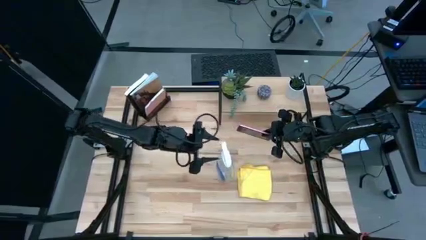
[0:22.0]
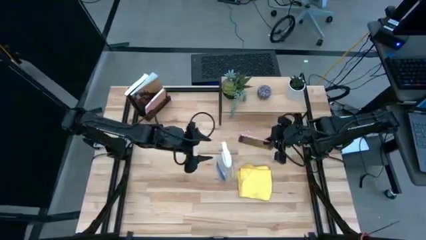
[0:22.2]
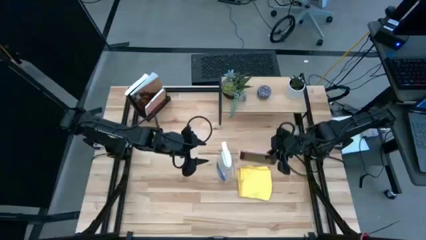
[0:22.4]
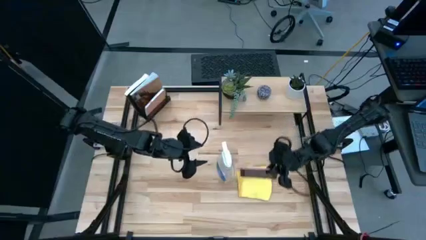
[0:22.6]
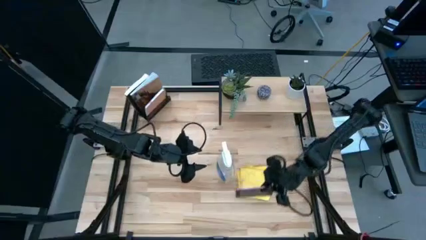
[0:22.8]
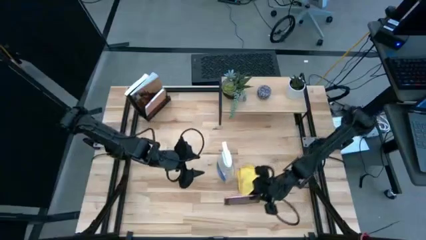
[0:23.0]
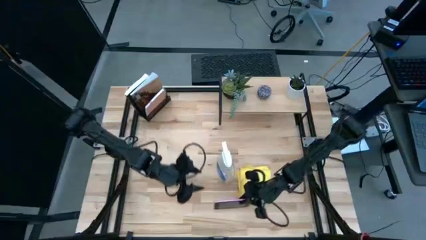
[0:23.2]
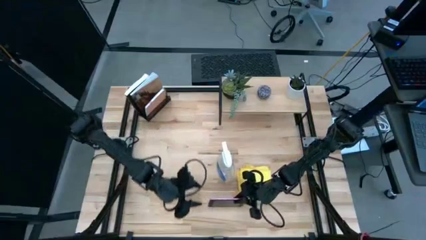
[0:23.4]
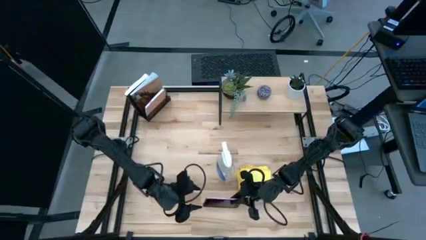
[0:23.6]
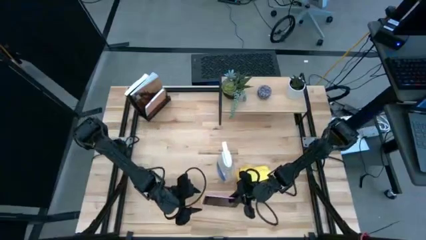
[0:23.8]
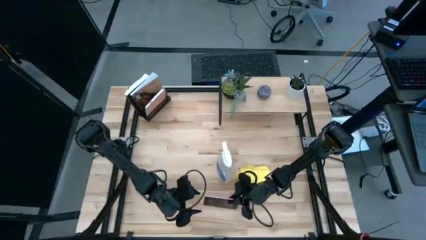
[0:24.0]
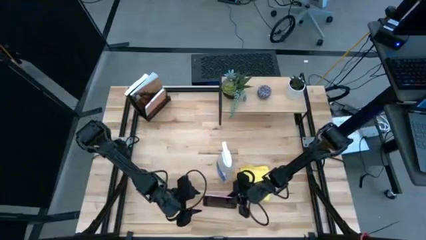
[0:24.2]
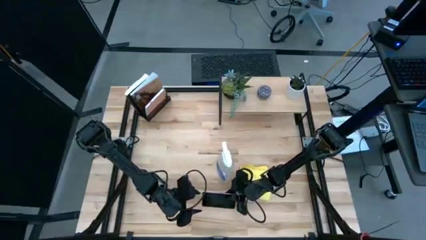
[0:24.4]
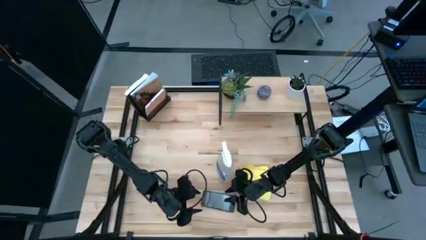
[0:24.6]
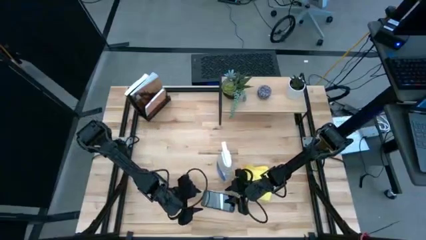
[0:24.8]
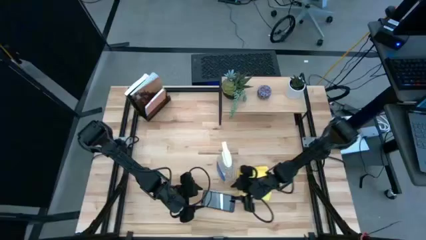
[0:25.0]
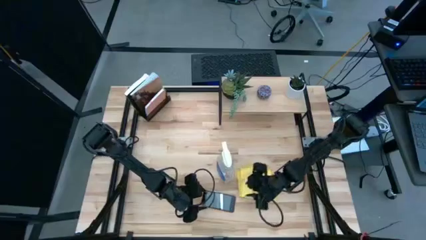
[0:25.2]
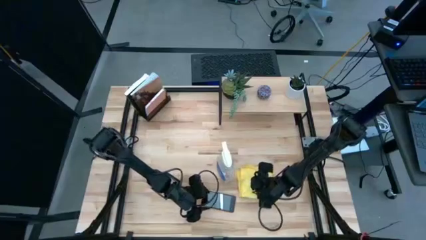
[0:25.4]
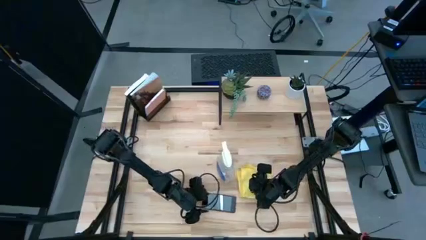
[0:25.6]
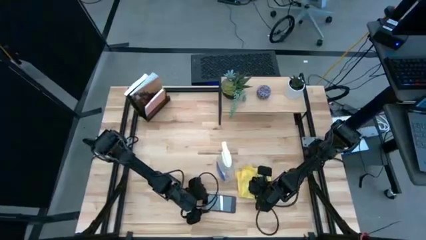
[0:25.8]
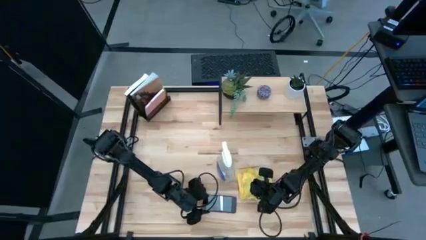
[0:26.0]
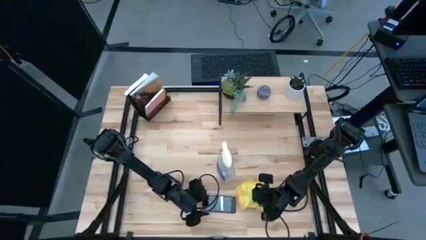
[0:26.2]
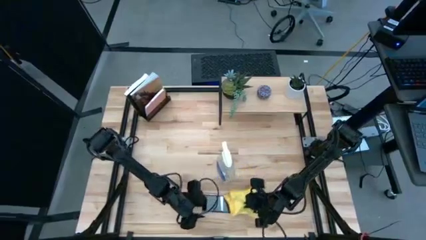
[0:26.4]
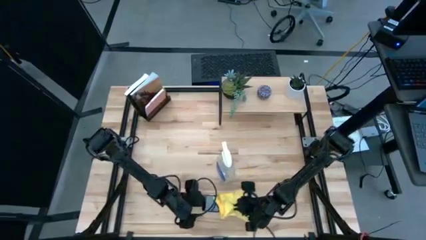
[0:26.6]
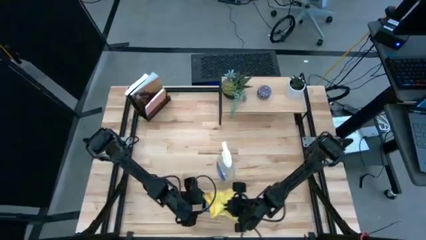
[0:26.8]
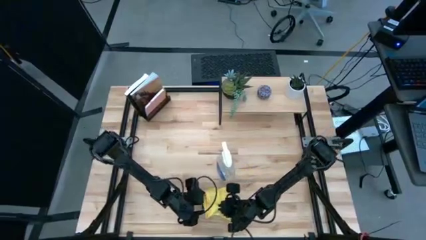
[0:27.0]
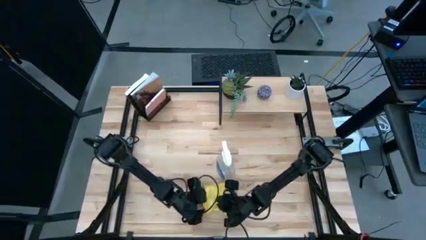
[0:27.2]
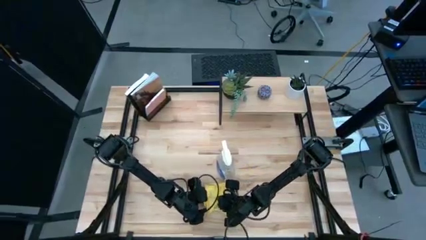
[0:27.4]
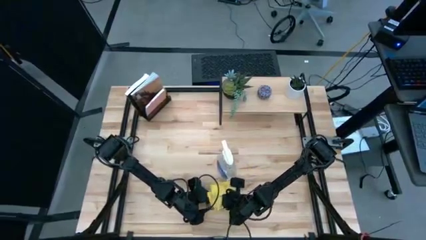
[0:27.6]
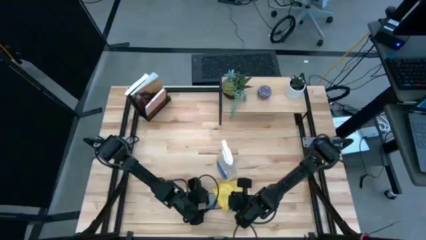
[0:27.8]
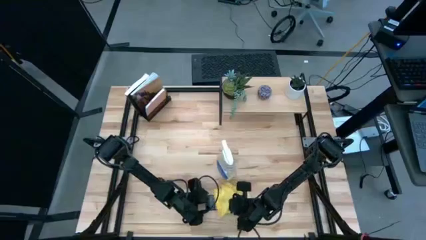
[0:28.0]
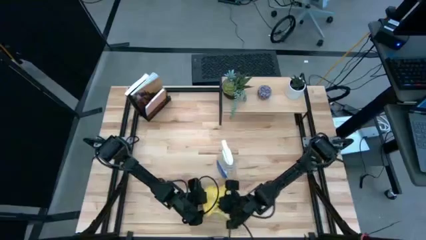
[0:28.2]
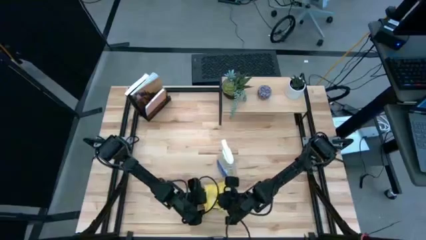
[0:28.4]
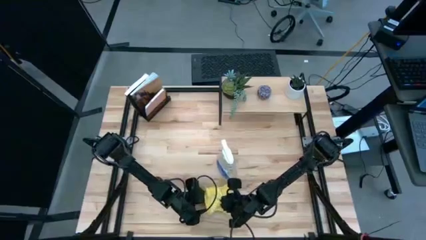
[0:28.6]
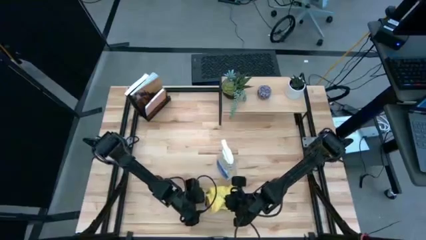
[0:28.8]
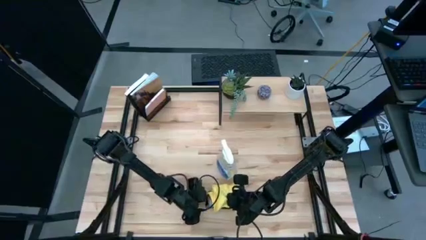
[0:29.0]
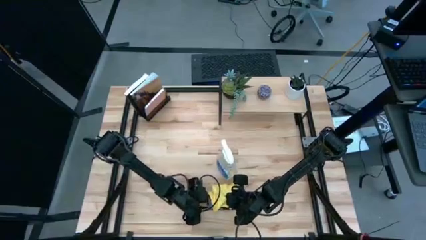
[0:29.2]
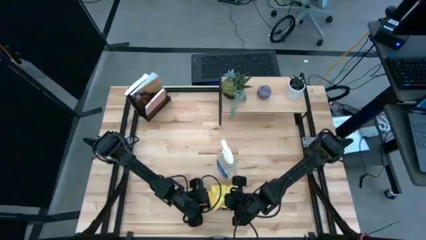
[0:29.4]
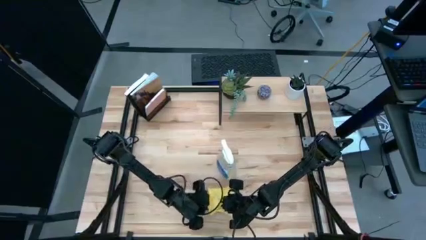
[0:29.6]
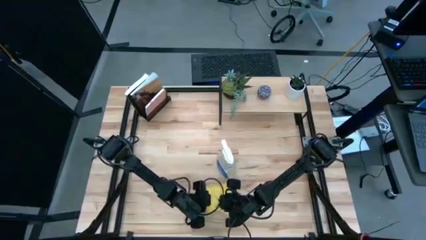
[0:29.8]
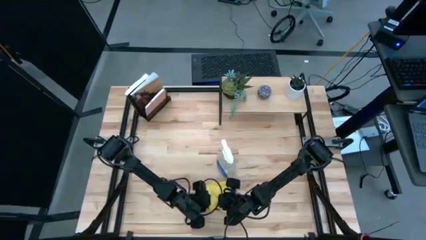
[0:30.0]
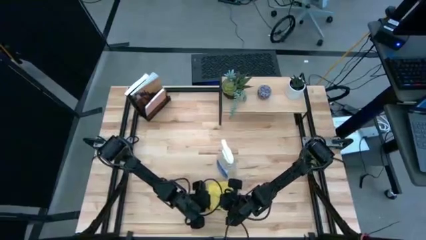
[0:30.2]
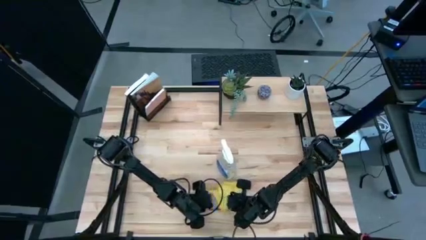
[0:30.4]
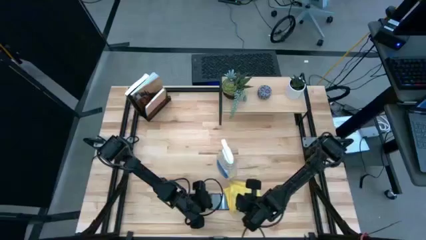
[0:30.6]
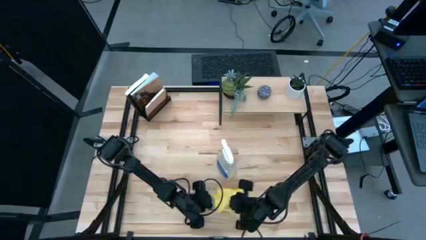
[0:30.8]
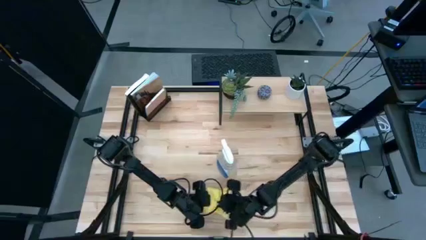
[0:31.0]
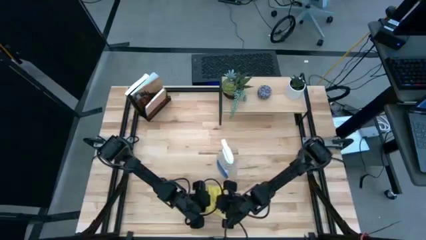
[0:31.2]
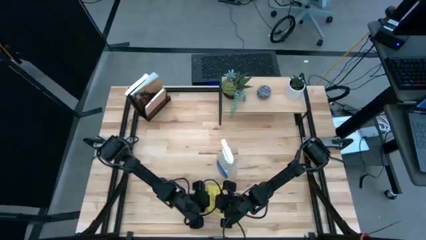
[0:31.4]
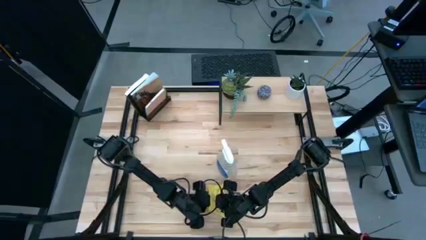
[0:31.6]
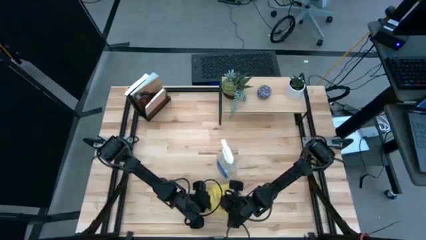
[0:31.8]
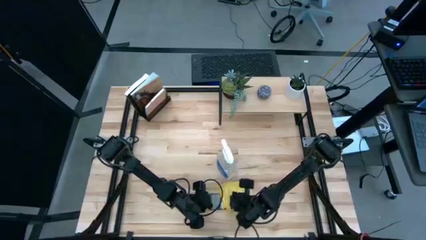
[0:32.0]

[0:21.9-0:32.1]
Task: Apply microfiber cloth
Wipe the front of the cellphone with the microfiber cloth

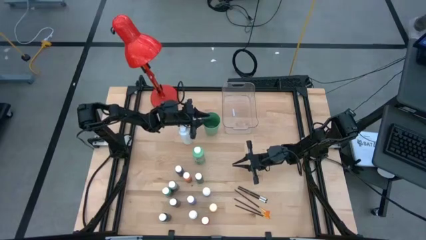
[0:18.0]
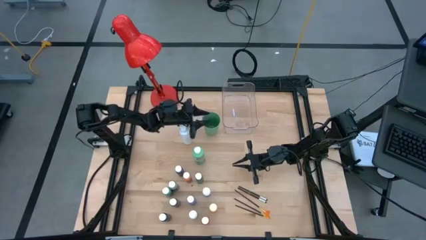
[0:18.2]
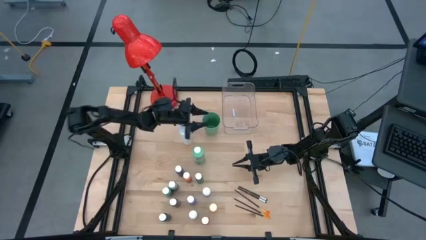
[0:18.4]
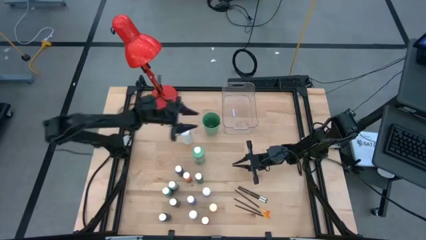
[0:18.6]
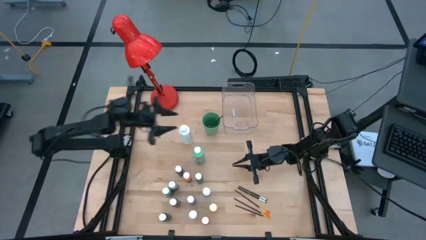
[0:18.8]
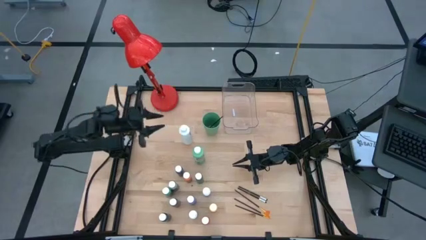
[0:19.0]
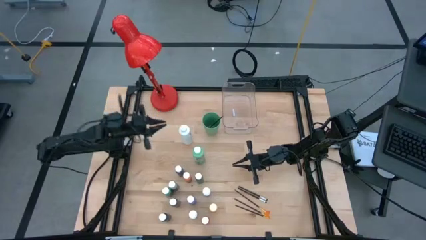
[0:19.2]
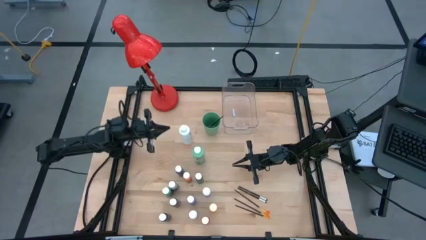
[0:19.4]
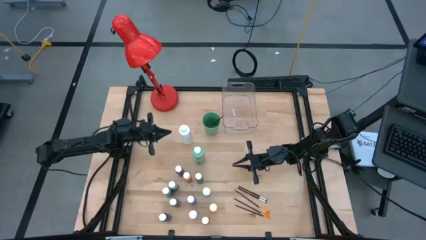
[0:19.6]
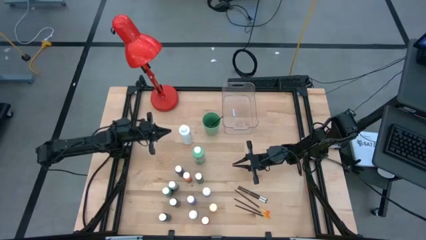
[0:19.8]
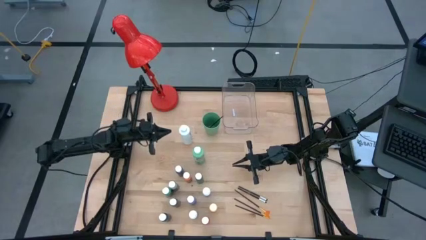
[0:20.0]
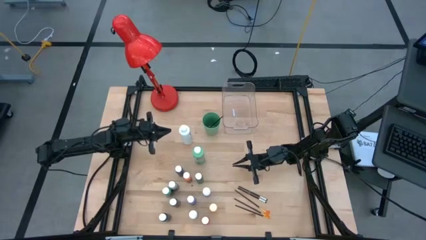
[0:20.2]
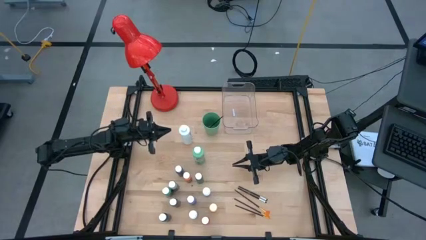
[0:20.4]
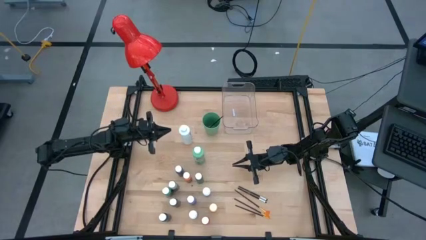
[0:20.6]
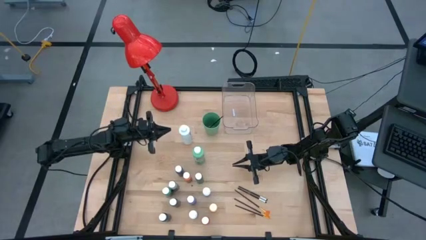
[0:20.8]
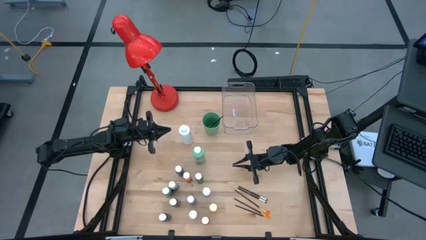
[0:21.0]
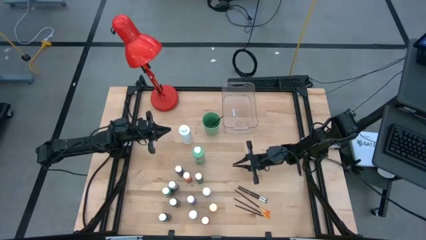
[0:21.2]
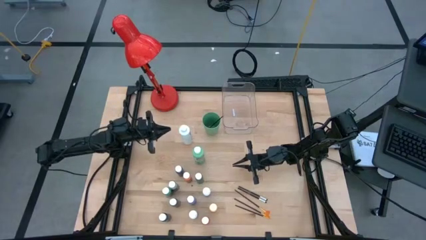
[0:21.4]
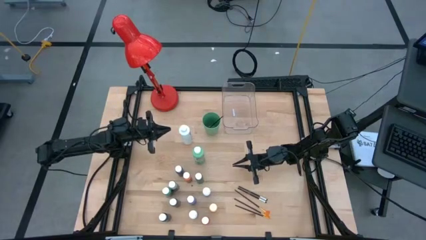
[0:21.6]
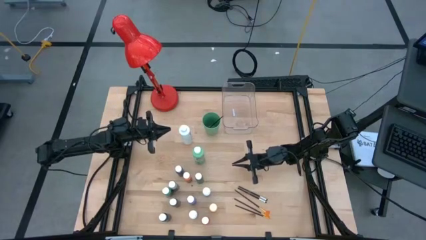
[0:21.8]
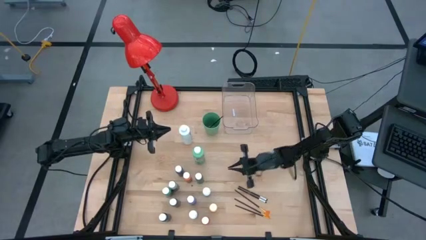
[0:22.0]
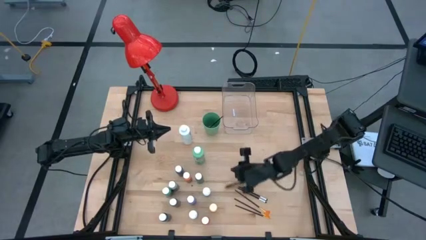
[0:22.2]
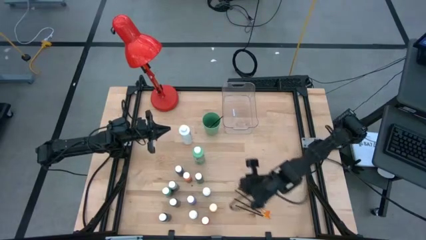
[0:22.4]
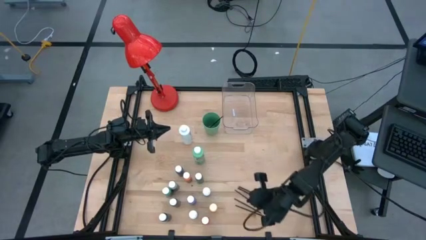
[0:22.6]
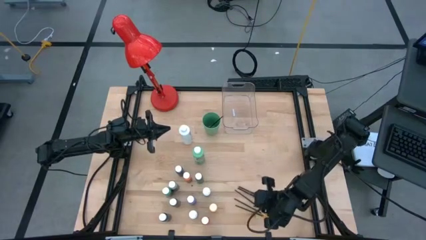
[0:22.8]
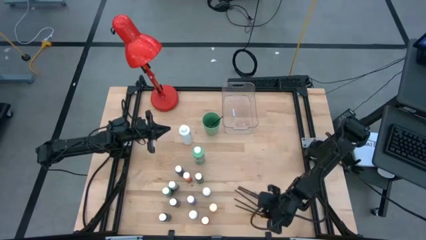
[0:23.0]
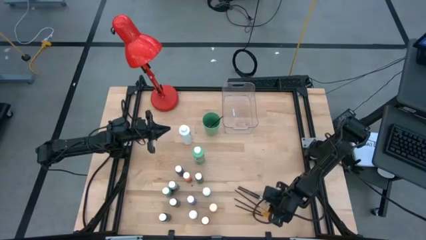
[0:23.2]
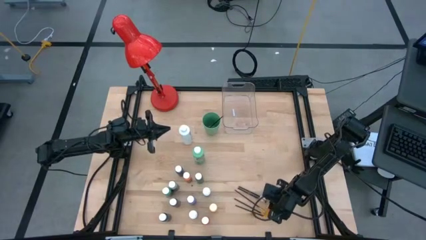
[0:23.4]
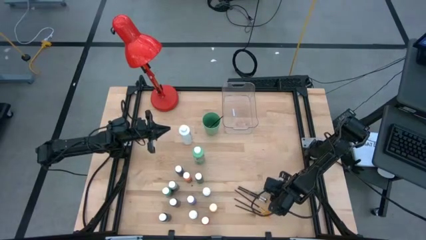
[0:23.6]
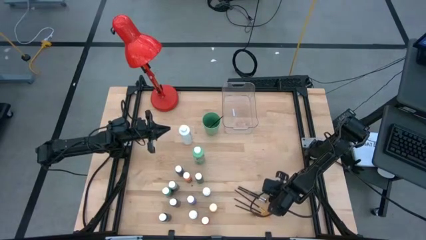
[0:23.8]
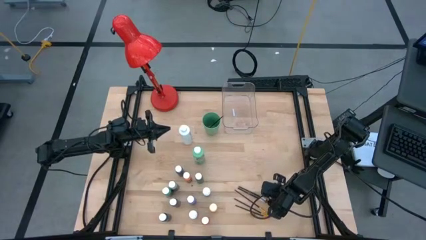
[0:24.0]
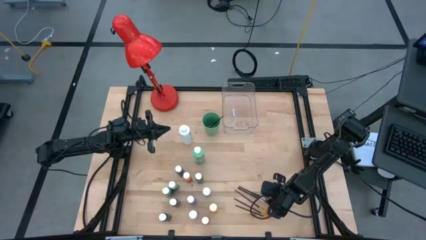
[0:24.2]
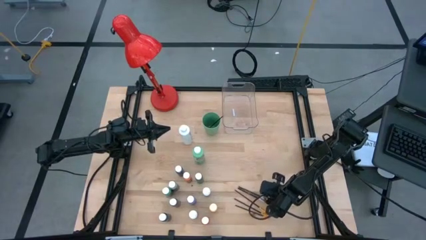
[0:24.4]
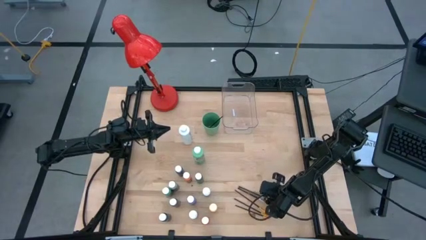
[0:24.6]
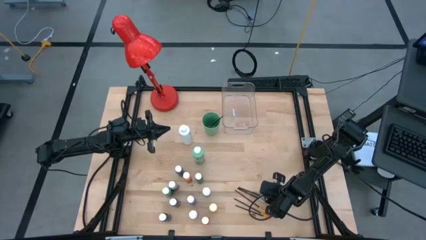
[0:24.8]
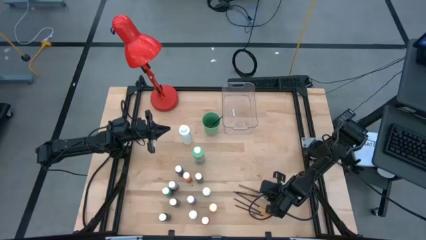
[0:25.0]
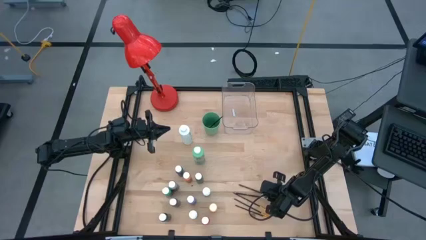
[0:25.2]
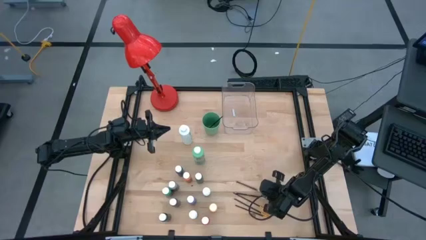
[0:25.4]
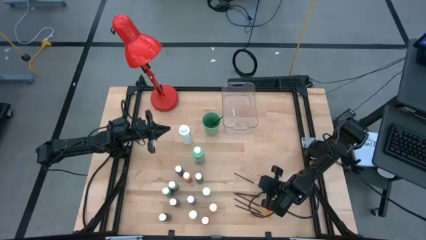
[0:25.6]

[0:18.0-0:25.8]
Task: Pick & Place Paint Supplies
Put the silver paint brush into the green cup
